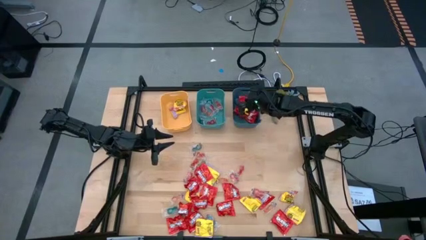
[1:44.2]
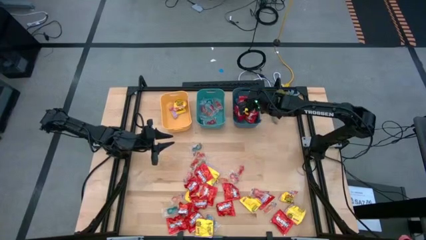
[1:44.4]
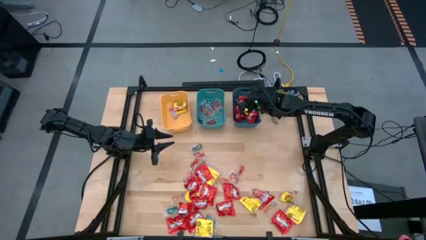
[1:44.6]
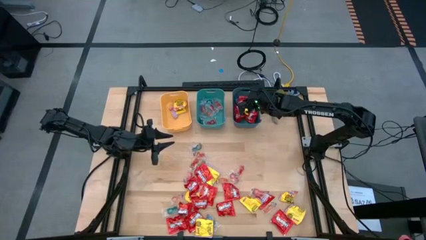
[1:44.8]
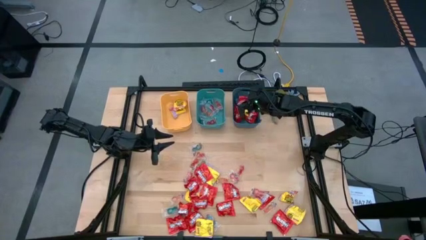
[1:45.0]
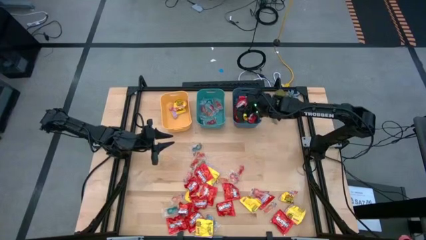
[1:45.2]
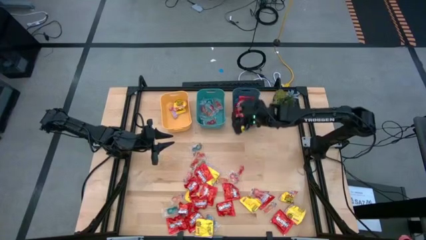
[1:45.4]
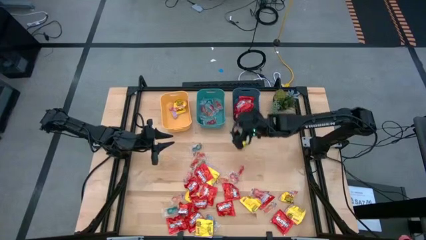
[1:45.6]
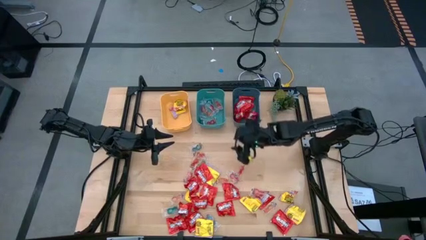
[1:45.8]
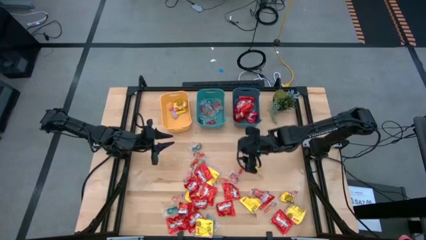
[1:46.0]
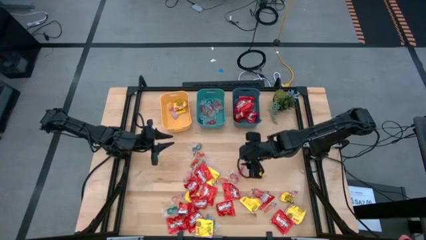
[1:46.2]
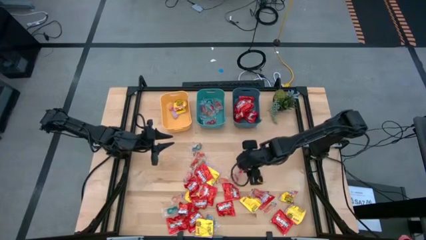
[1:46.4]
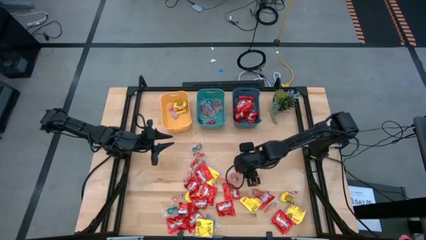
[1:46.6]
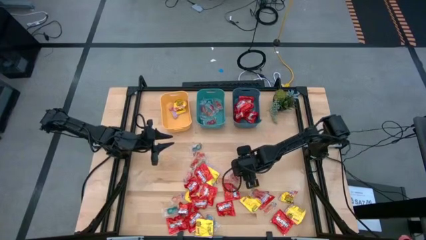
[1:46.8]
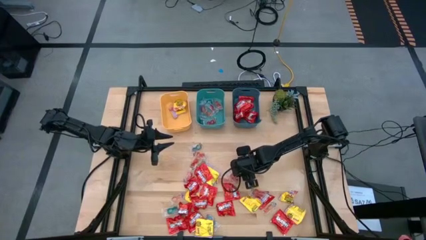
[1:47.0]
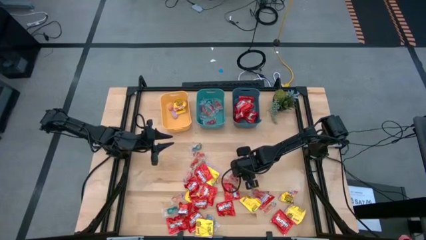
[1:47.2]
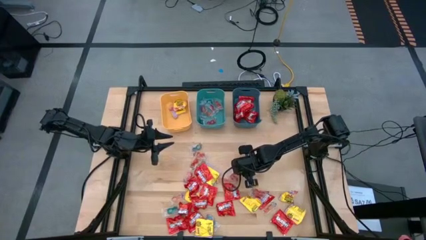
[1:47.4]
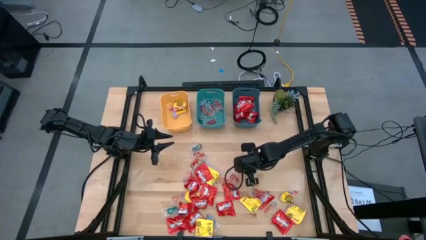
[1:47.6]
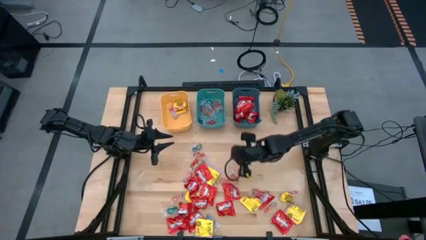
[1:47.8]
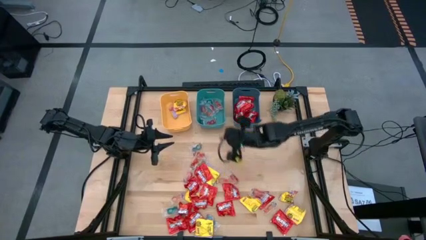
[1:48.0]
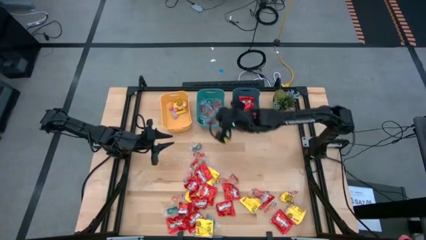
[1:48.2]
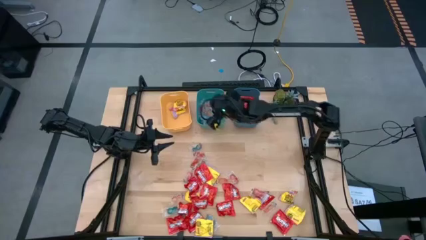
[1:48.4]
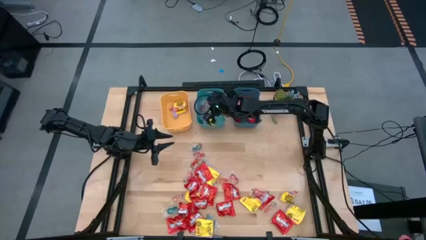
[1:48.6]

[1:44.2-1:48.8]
Task: Sort candy
Put the orange gummy candy into the green bin

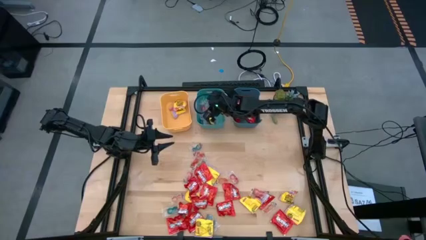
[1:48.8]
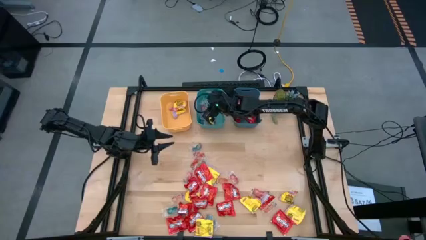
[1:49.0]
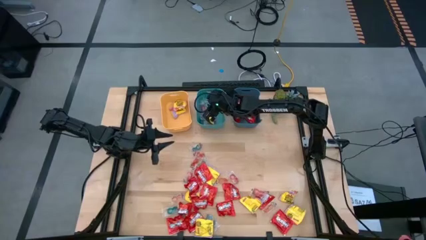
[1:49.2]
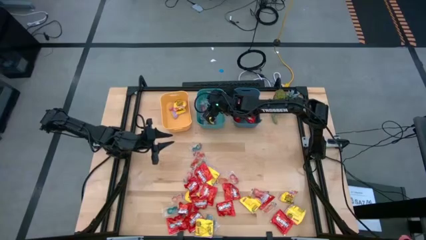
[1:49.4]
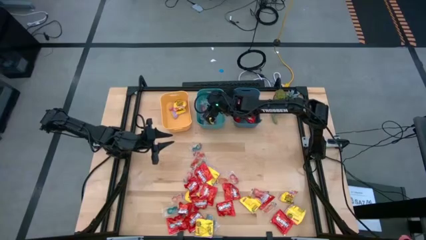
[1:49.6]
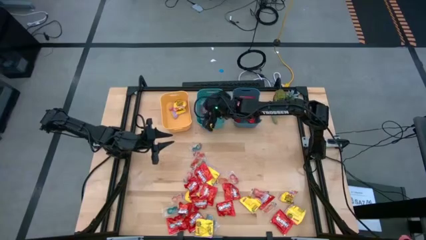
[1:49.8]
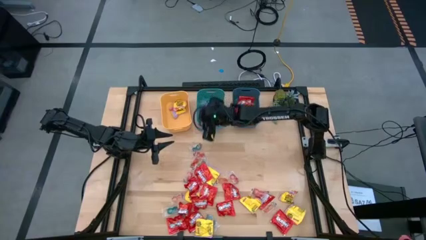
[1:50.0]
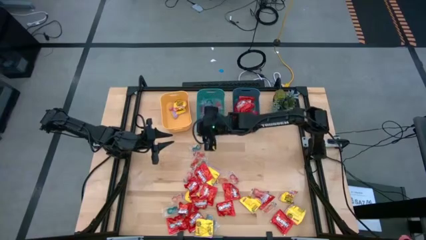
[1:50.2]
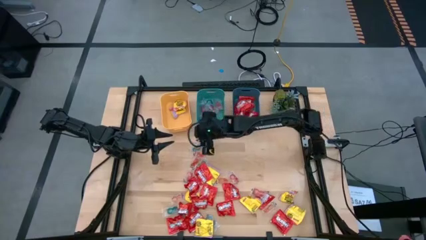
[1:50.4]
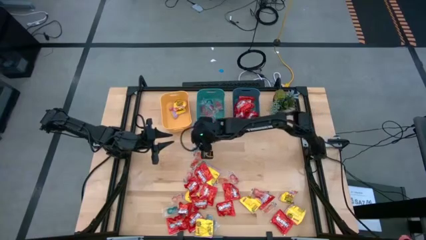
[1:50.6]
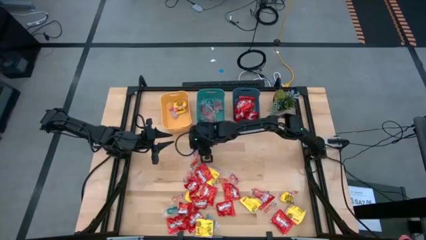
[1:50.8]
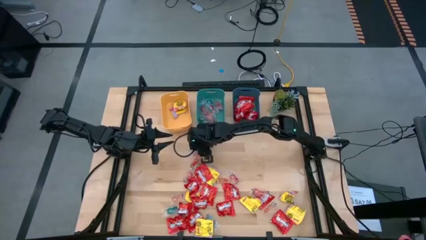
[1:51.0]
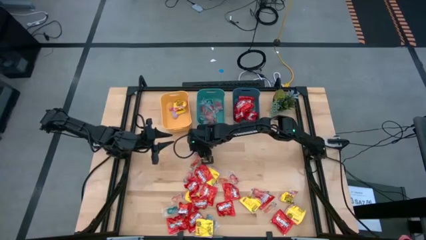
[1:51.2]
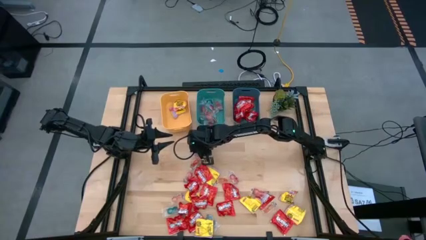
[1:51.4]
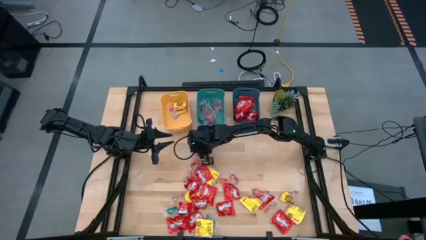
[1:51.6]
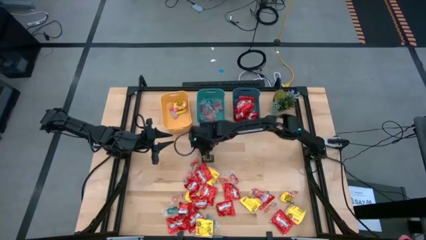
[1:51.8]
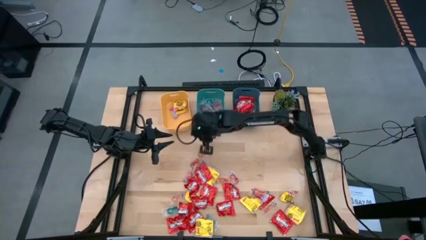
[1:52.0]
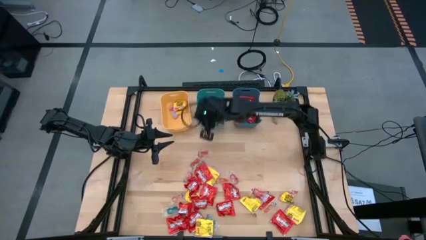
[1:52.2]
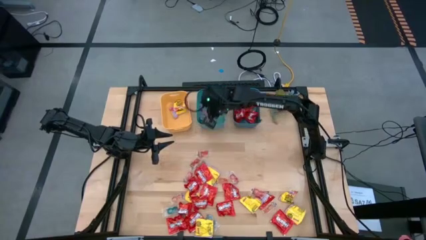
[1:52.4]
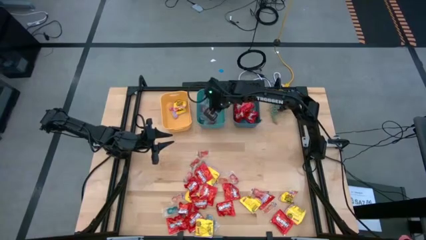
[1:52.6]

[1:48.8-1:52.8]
Put the blue gummy candy into the green bin

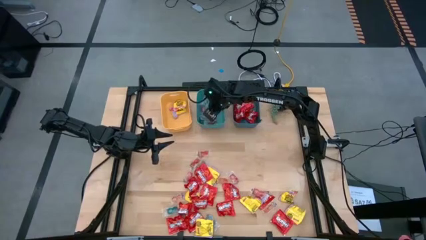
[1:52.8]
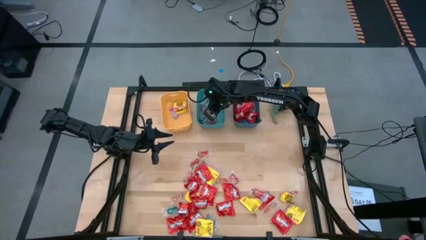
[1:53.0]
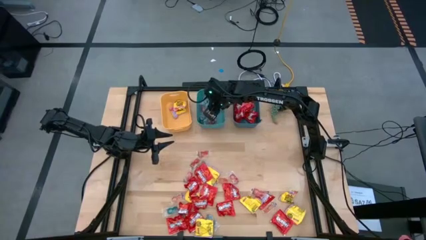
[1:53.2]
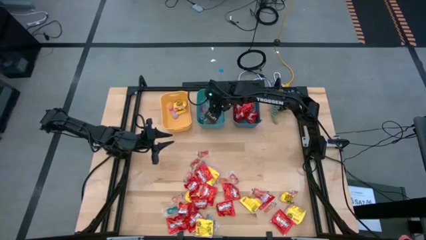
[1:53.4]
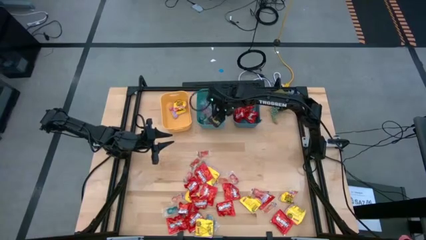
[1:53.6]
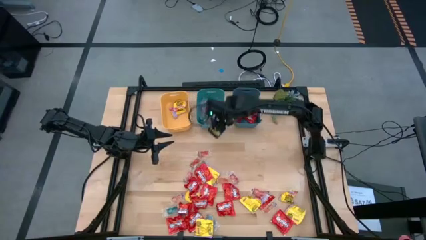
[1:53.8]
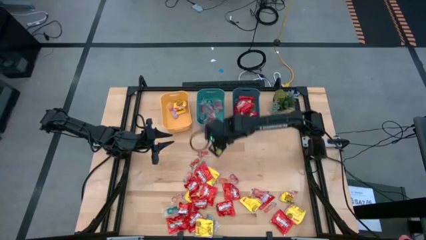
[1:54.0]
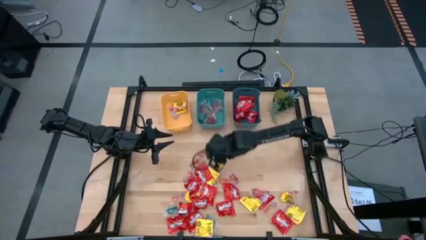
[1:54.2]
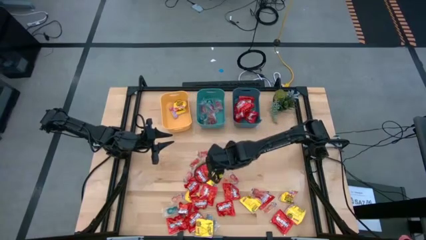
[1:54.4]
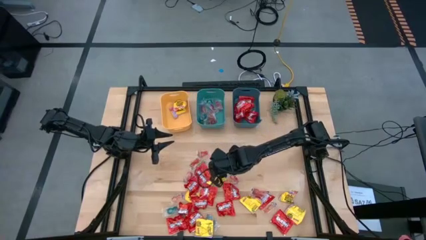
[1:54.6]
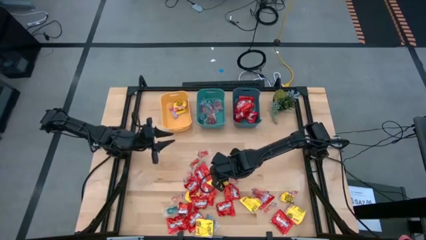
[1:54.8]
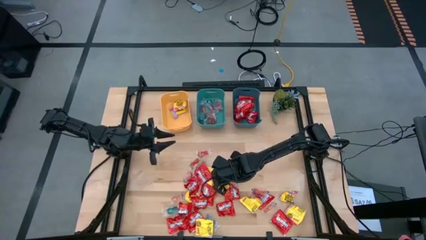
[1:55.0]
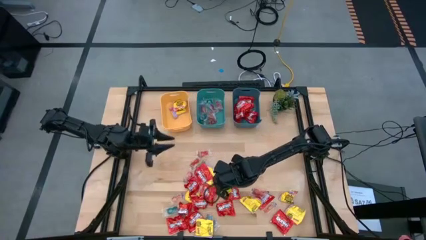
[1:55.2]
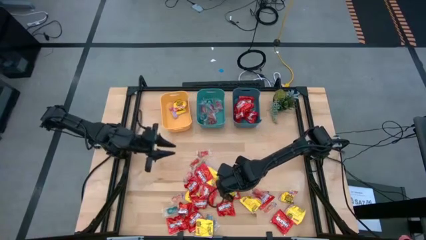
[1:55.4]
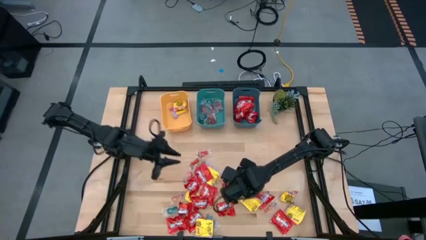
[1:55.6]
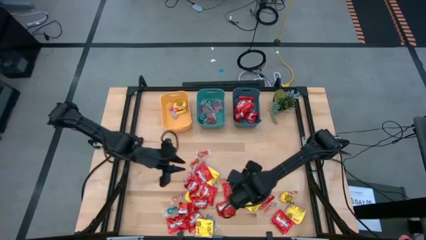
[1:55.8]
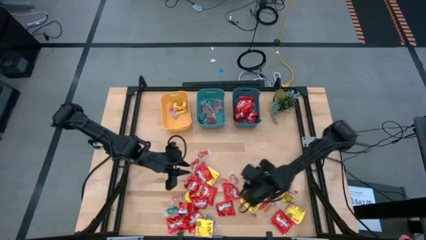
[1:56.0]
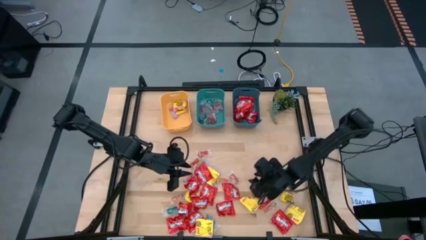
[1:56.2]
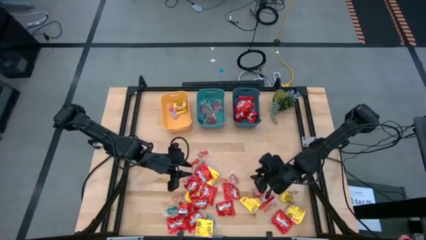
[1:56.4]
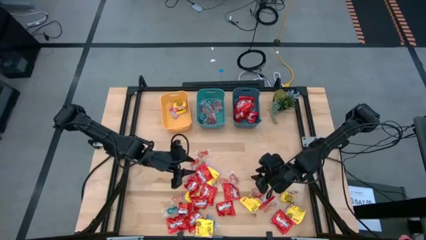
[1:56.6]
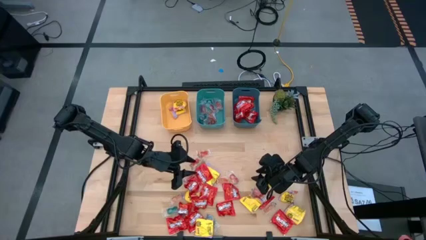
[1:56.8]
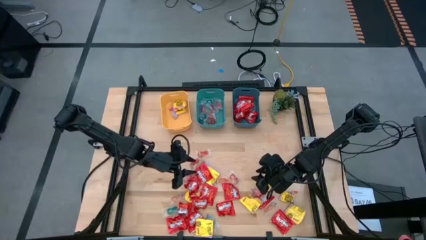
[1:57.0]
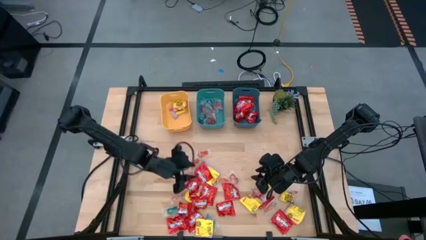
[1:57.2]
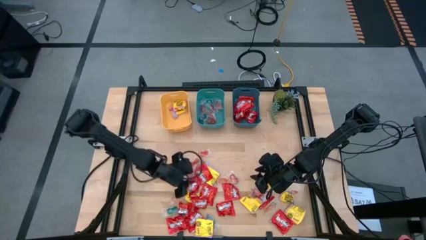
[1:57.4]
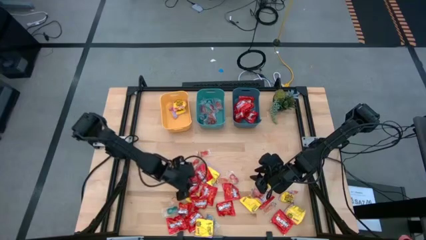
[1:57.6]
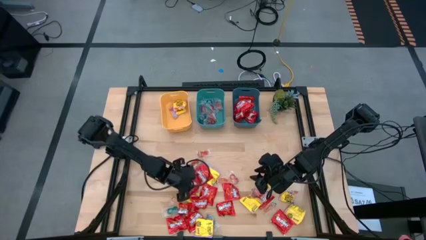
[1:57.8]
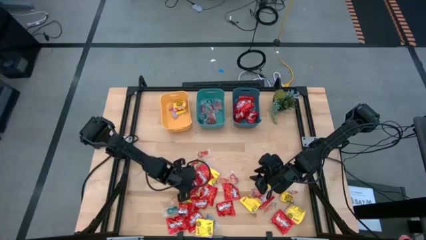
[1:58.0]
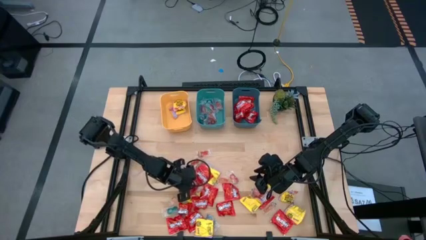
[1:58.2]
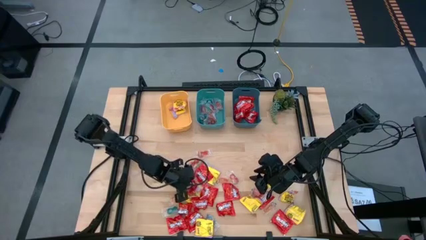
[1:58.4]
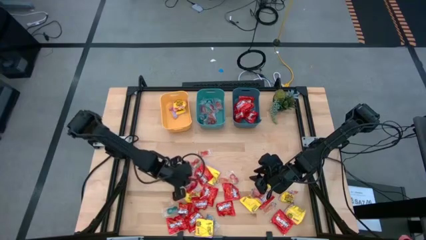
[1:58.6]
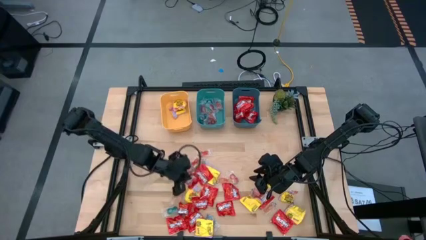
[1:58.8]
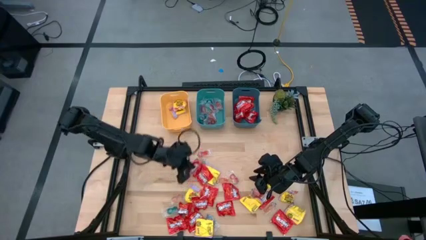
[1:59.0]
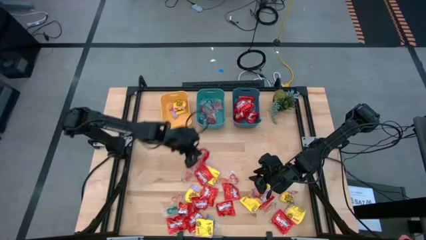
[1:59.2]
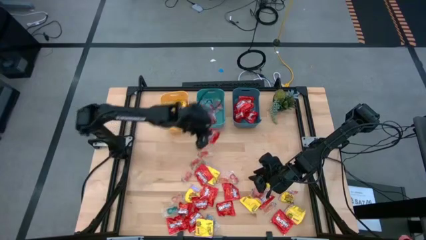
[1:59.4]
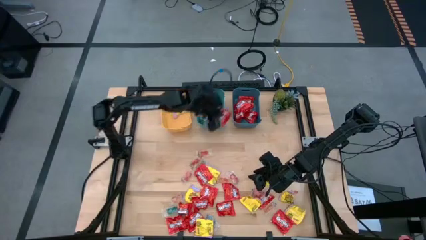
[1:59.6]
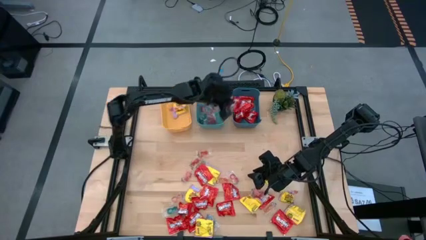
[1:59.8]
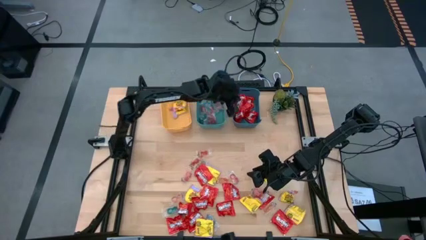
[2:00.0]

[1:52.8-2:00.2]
Put the red candy into the blue bin
